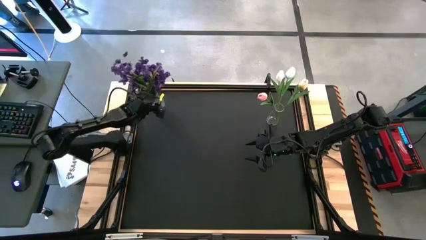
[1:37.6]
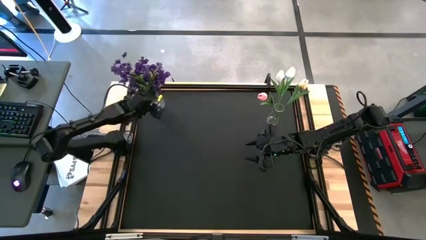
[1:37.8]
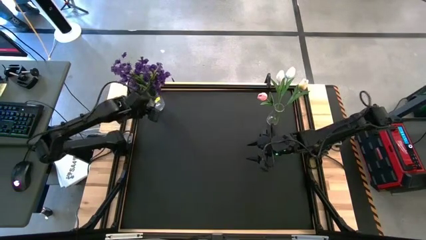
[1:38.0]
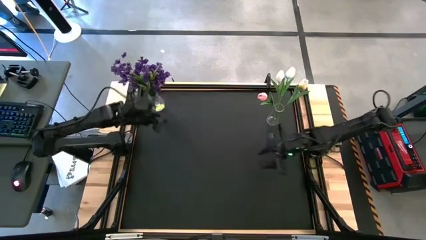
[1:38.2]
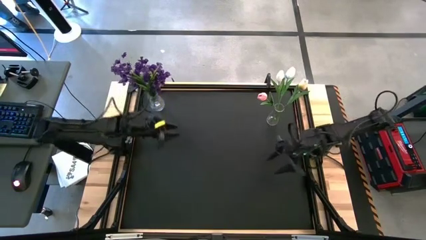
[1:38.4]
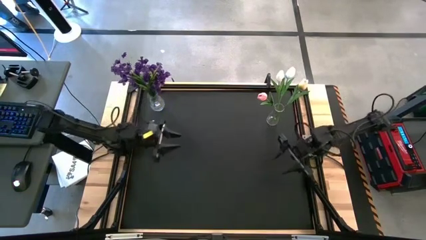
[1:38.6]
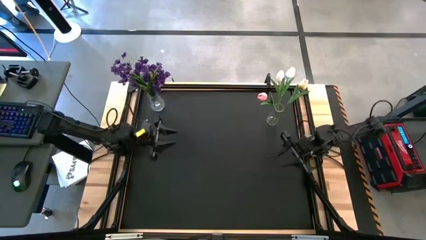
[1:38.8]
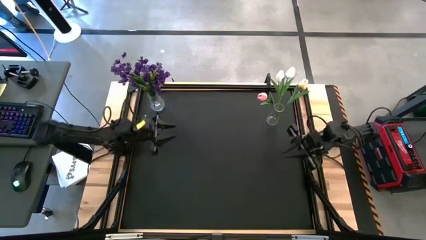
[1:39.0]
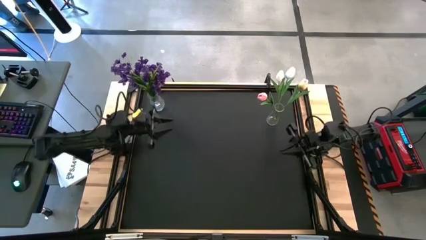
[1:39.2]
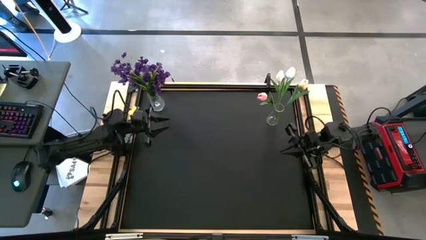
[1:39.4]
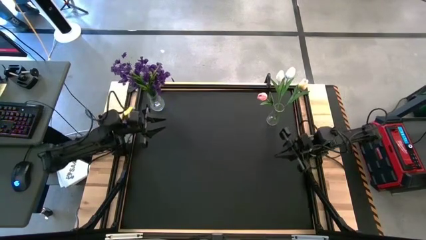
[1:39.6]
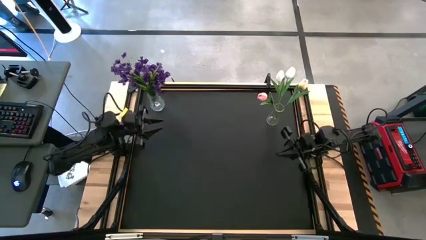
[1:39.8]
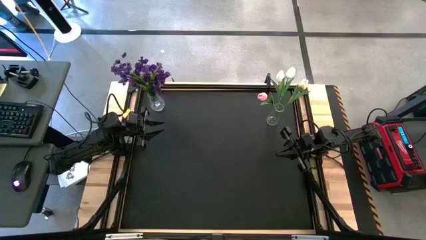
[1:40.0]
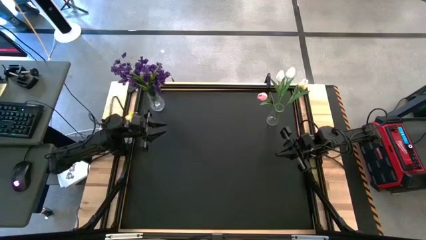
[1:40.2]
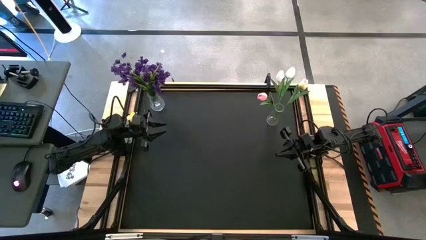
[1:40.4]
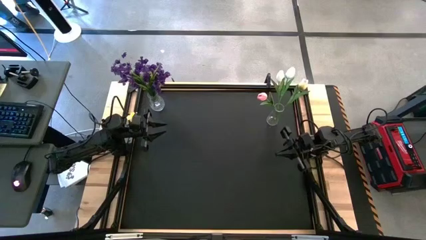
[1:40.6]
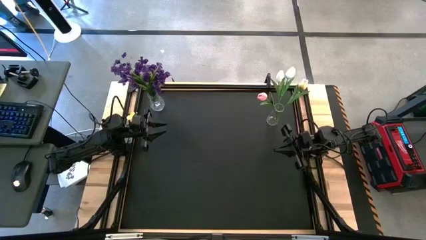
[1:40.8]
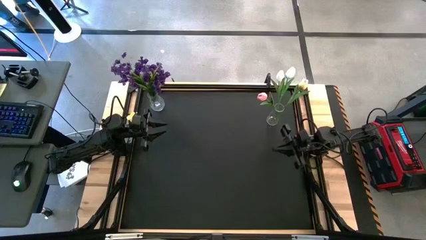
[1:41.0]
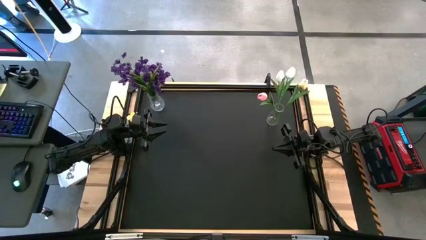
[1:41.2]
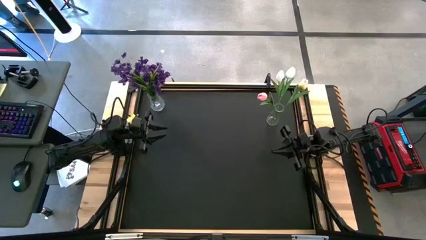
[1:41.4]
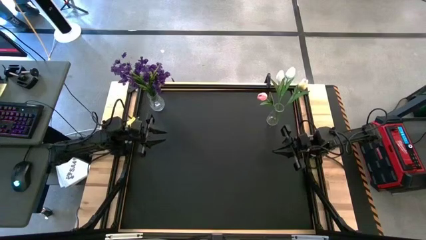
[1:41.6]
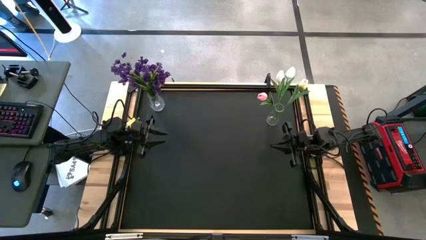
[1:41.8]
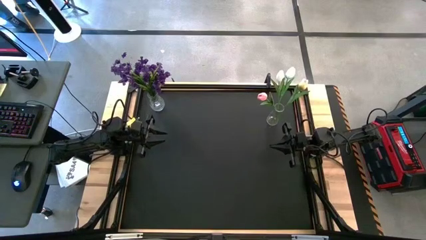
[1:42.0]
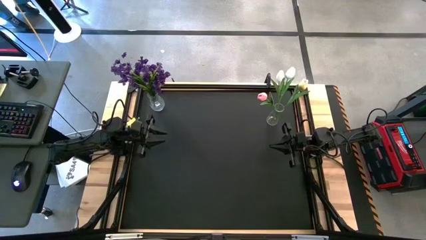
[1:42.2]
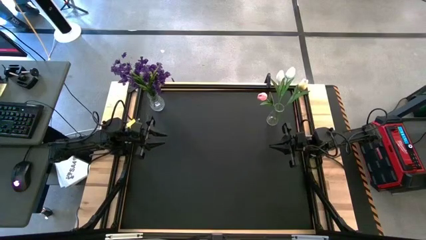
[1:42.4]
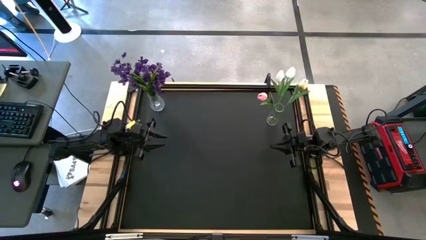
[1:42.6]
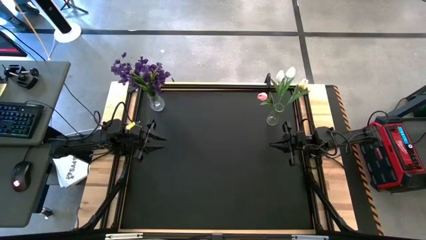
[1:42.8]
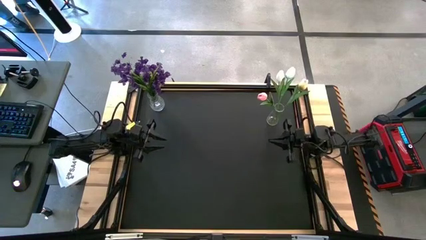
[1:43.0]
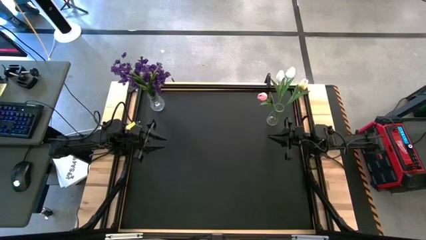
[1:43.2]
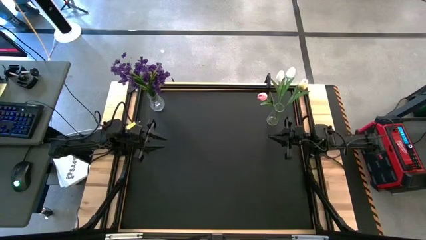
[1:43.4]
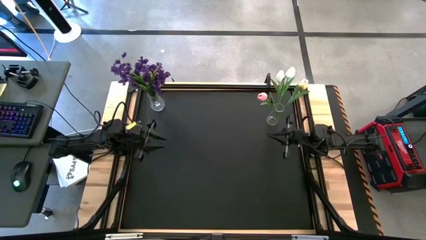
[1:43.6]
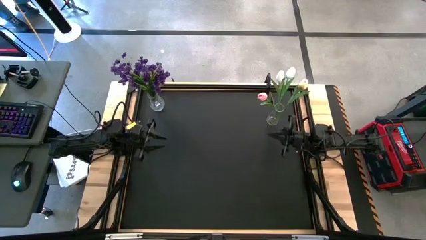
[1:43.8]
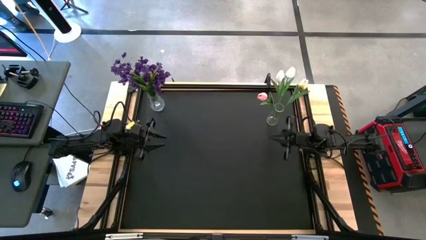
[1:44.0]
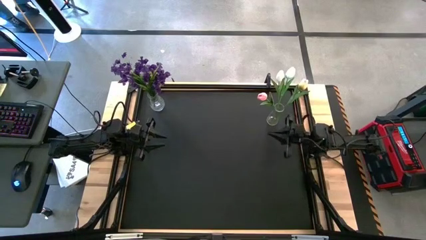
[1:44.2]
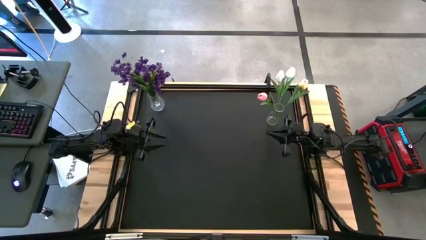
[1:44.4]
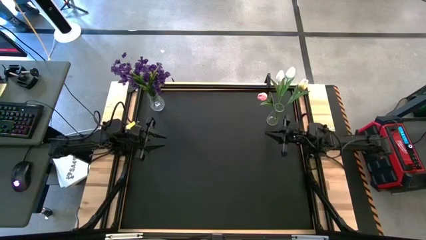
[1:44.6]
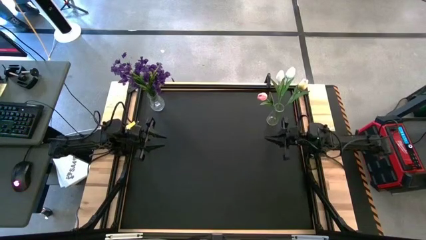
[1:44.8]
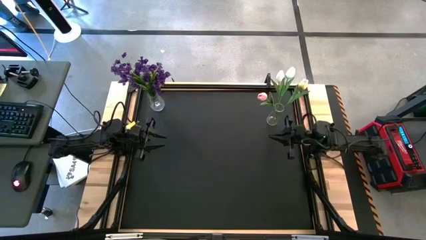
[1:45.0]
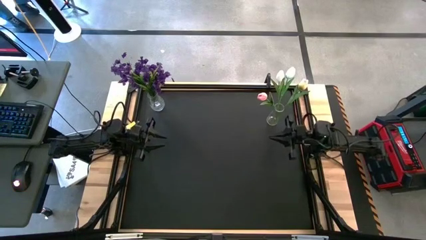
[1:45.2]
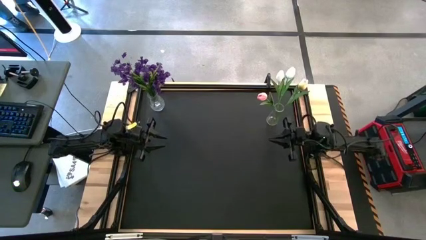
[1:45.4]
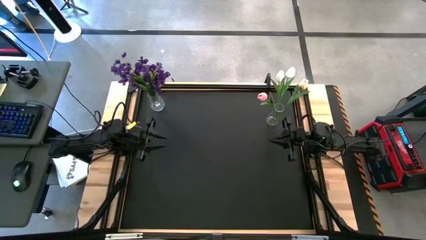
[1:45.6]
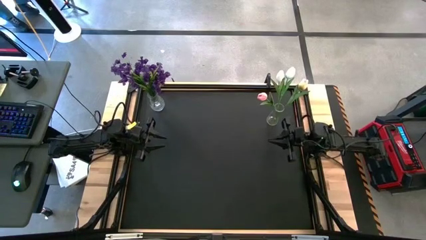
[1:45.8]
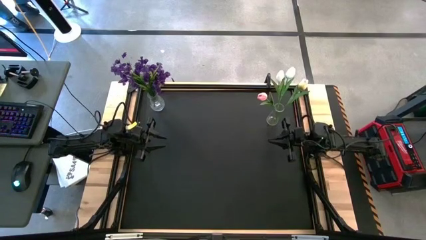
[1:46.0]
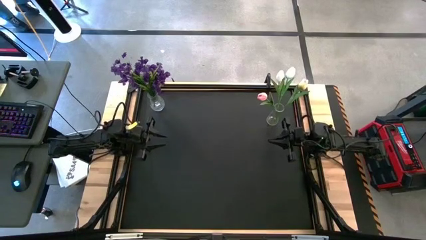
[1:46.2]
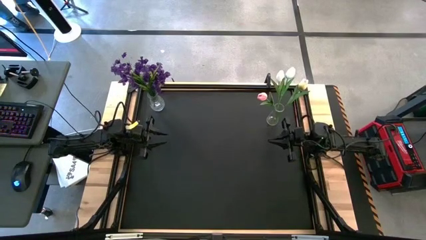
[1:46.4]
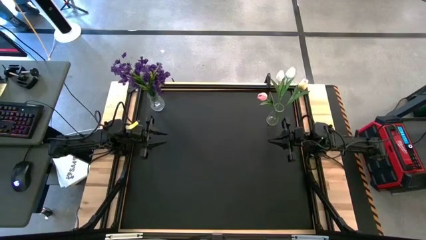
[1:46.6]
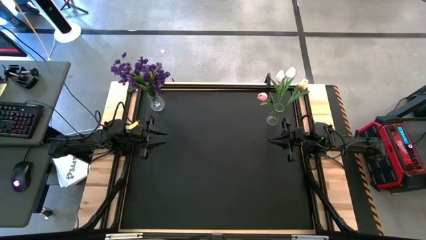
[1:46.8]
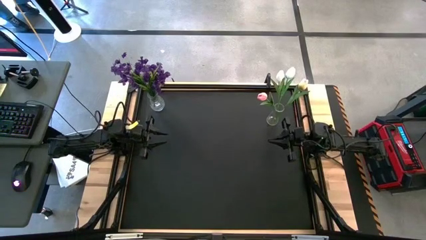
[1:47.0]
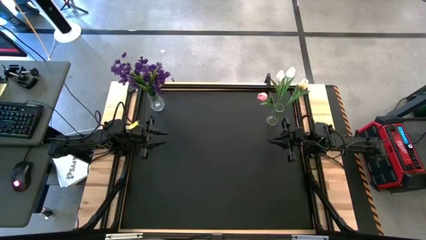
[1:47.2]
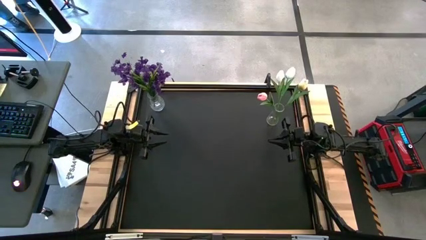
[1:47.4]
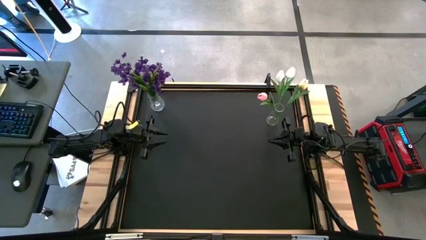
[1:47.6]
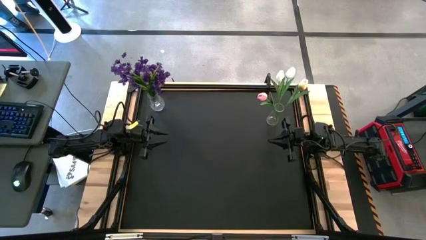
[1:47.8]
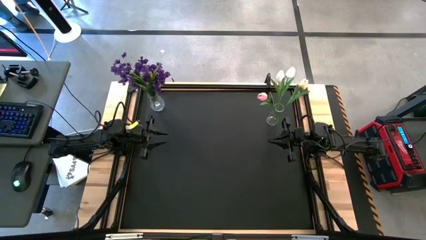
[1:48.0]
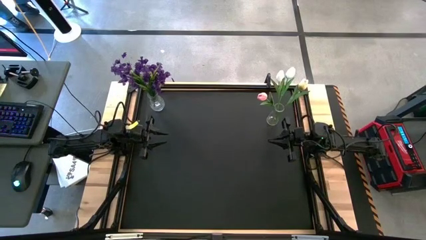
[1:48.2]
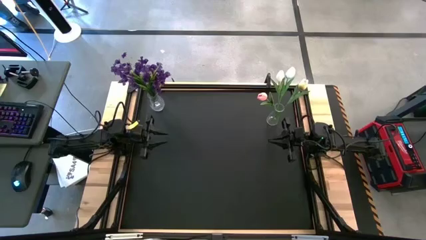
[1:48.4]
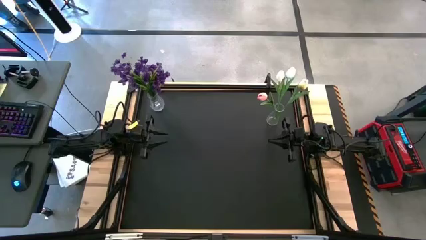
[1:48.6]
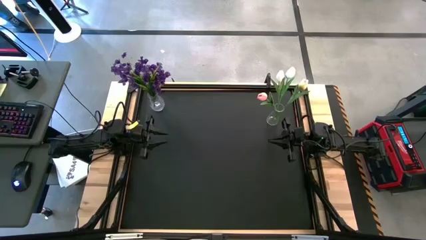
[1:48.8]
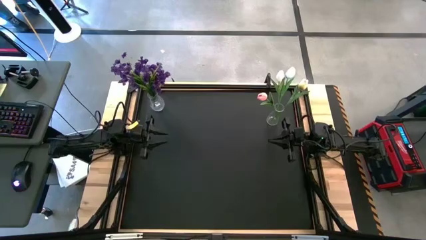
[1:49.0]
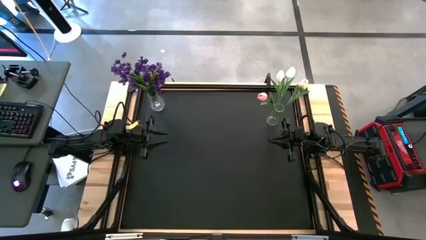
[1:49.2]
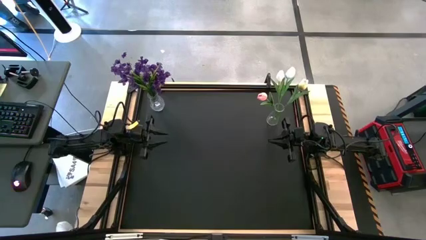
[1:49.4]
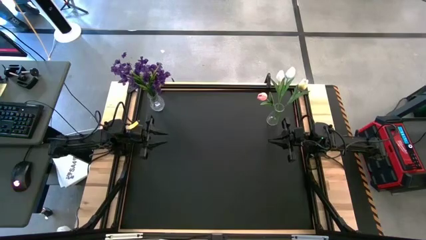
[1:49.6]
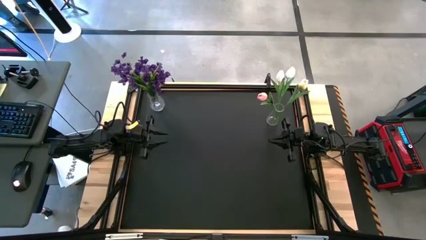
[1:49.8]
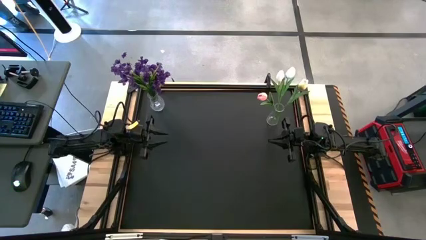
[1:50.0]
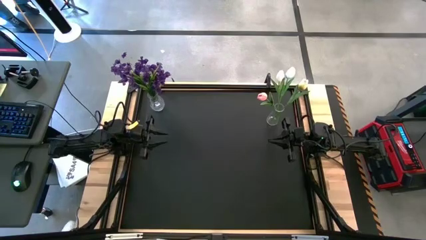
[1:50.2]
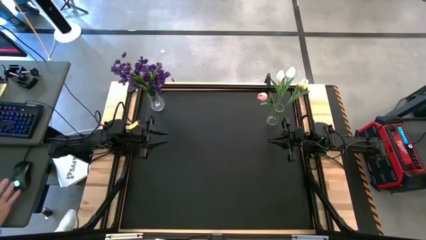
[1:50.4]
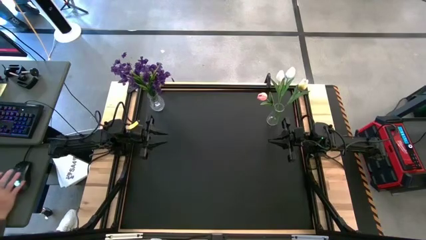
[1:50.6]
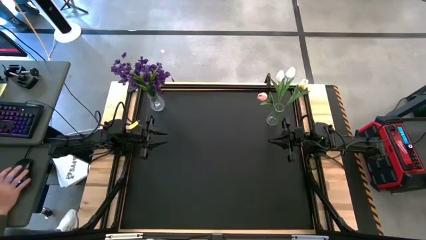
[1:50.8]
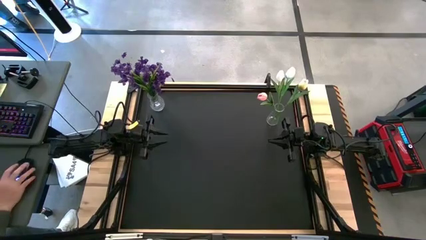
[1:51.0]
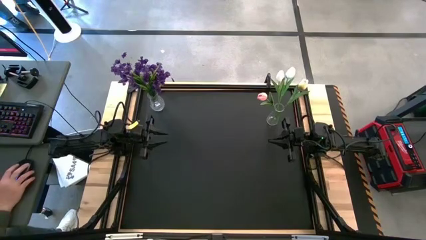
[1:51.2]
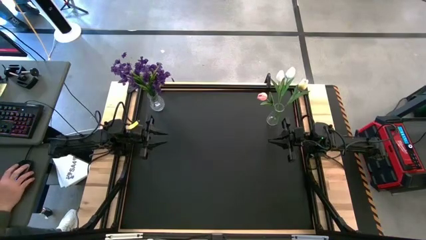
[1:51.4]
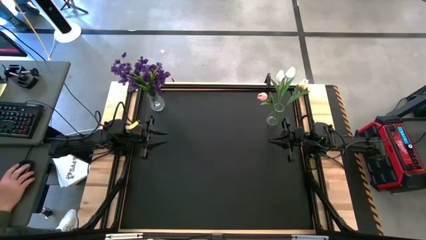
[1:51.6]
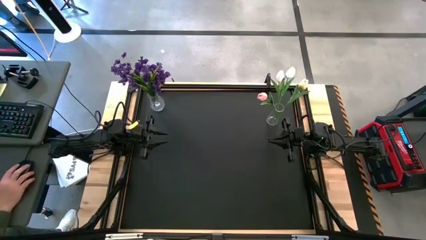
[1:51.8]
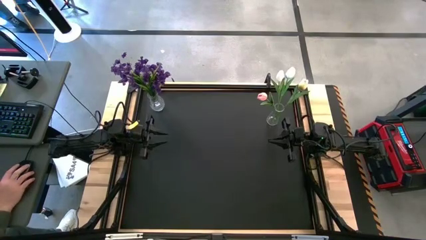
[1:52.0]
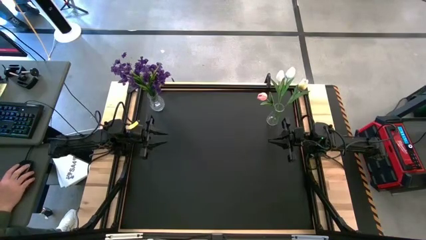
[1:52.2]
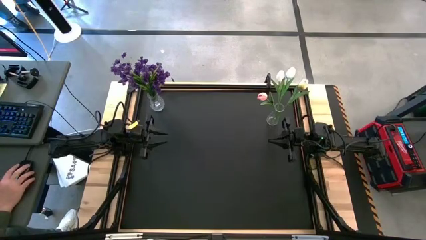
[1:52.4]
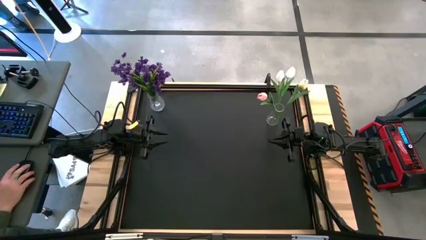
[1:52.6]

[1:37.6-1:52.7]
Task: Sort flowers into vase by color
Return to Home Position
